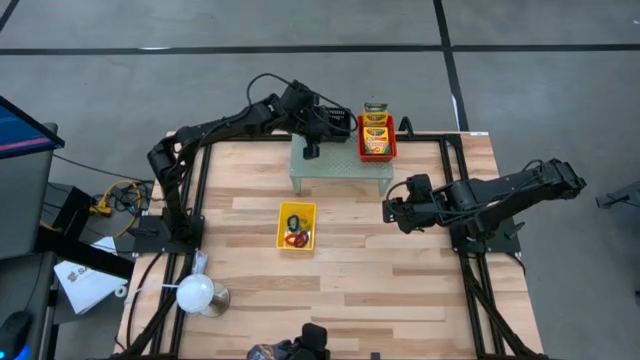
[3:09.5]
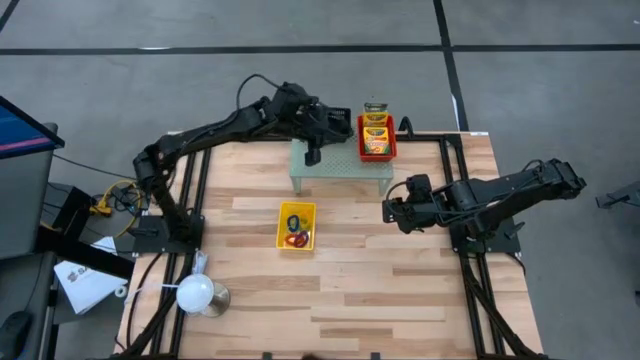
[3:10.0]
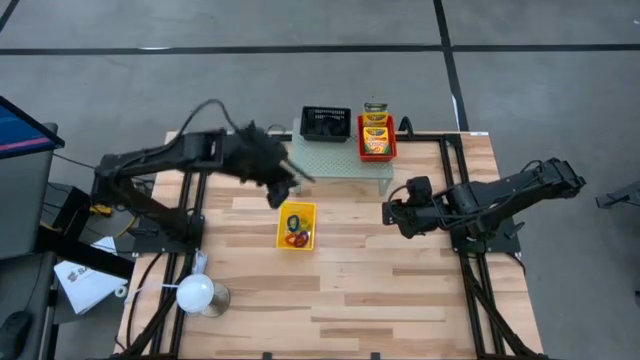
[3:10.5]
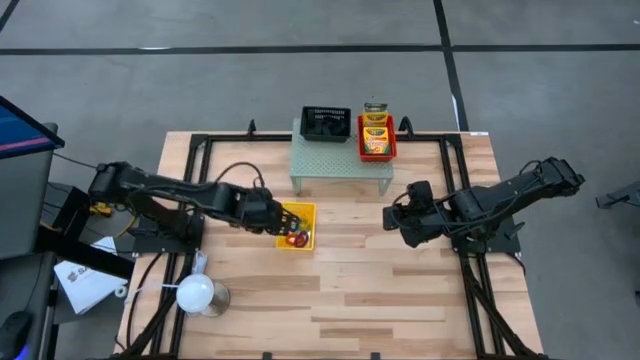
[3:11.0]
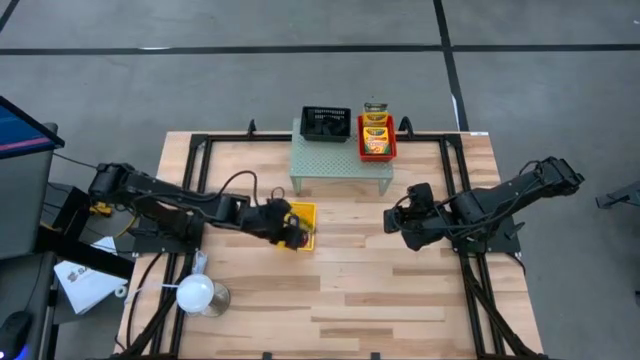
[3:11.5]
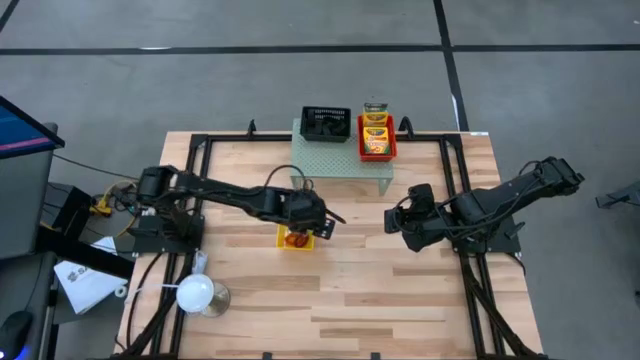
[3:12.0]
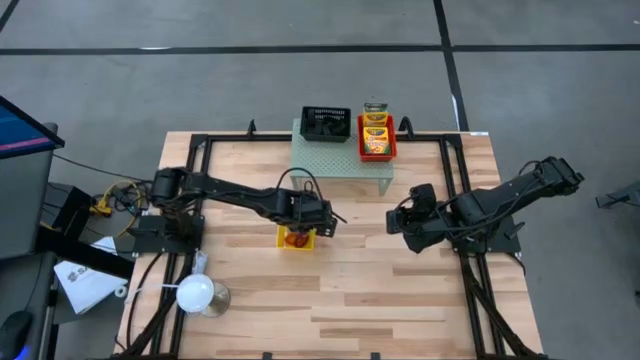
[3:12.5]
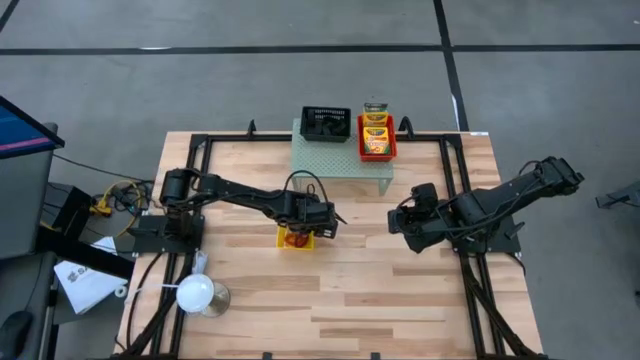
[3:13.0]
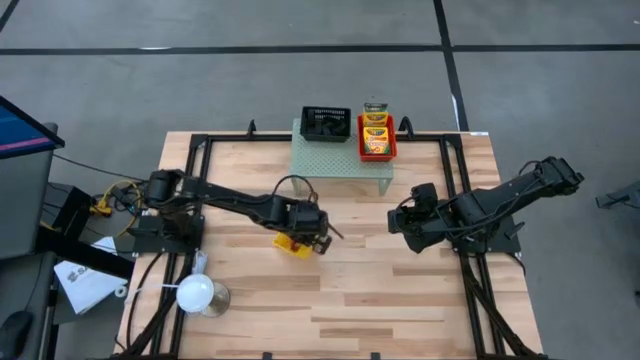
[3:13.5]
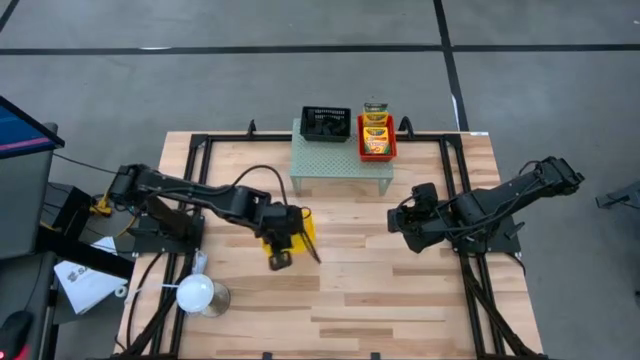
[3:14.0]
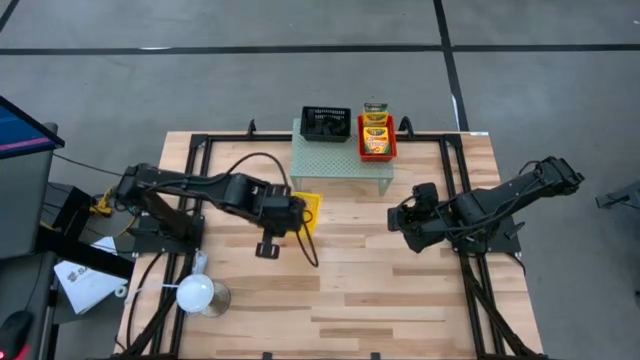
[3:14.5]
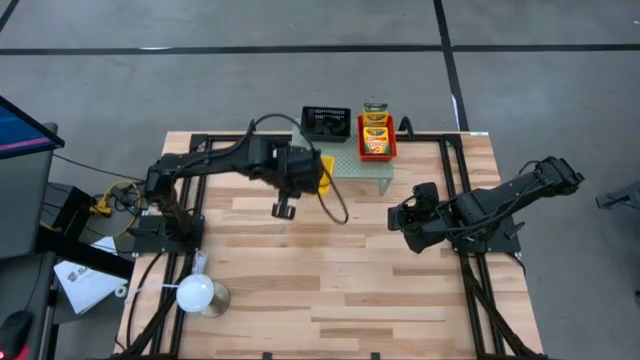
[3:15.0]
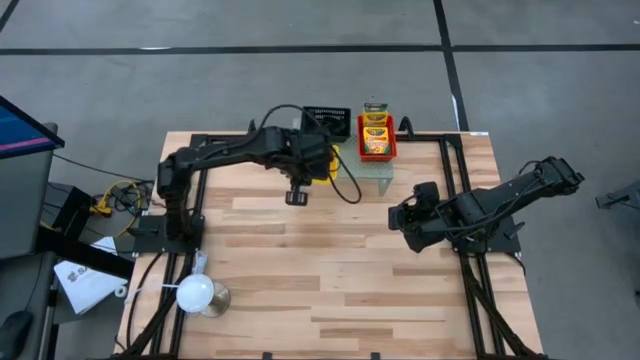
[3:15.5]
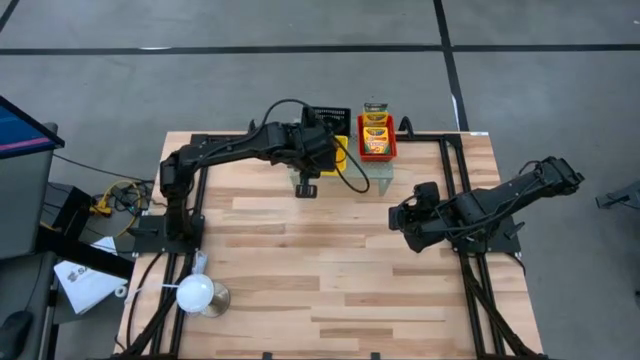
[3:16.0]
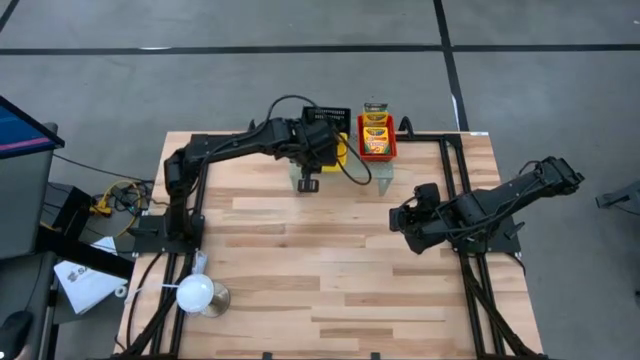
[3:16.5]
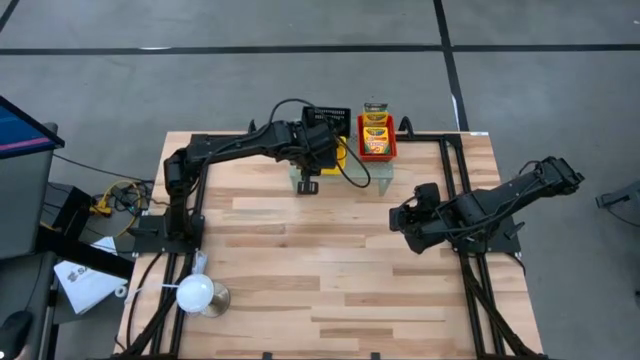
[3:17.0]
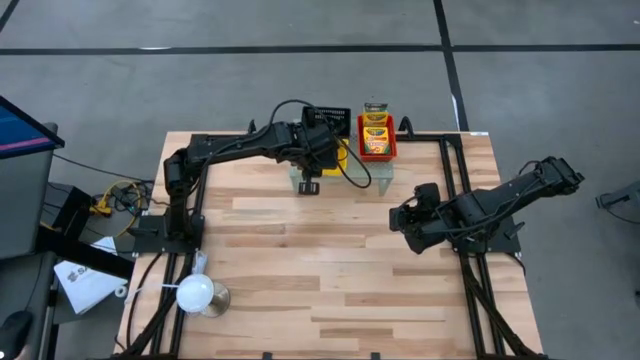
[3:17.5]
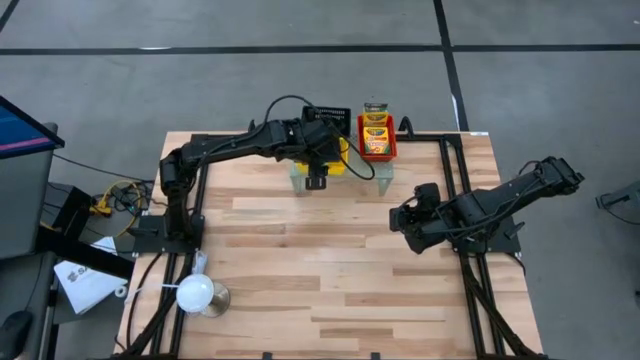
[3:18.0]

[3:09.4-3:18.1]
Task: Pick & Place Office Desk Supplies
Put the yellow bin on the shelf

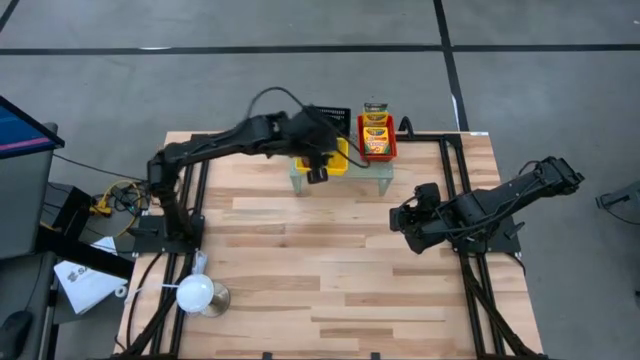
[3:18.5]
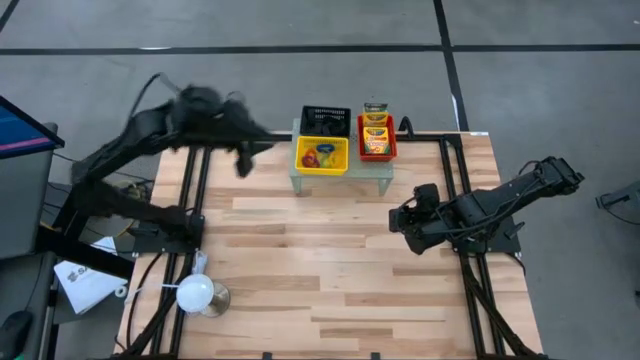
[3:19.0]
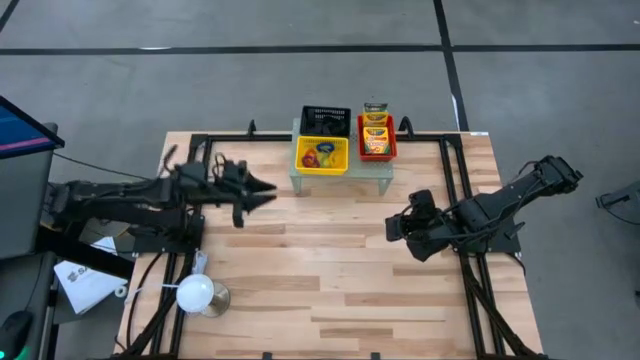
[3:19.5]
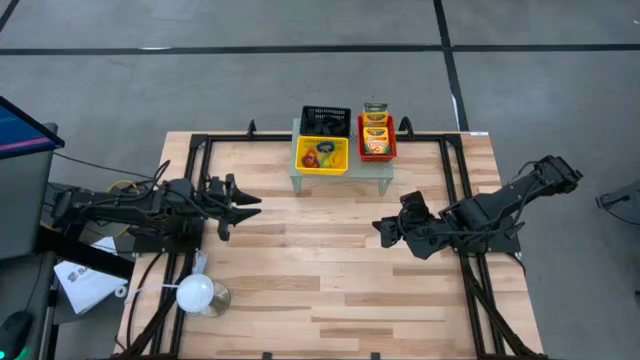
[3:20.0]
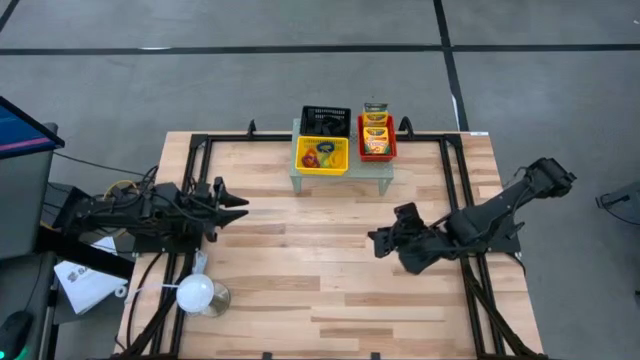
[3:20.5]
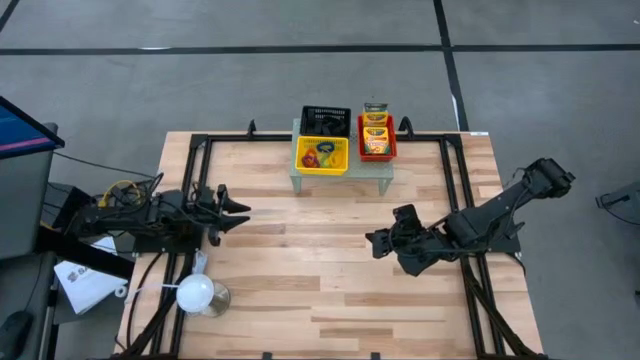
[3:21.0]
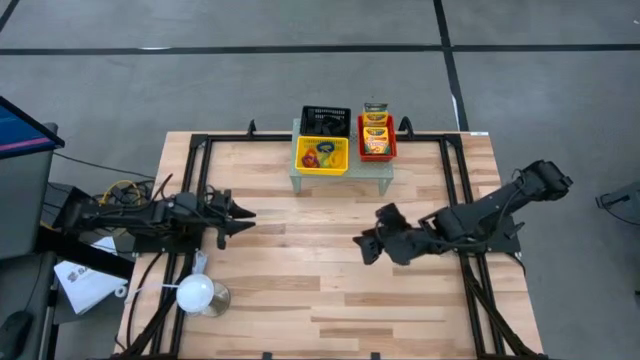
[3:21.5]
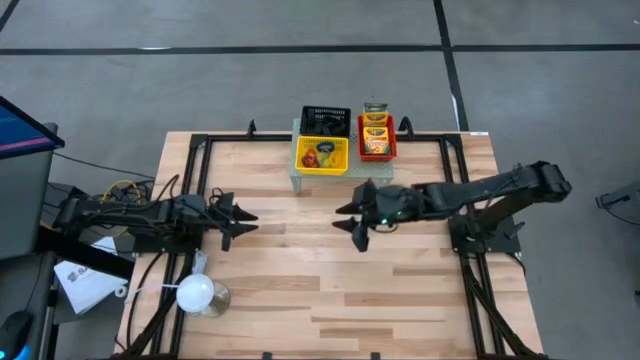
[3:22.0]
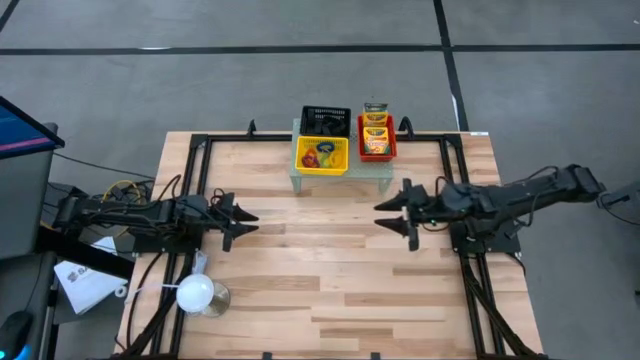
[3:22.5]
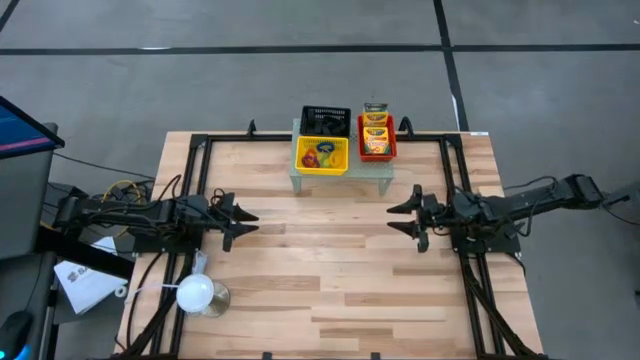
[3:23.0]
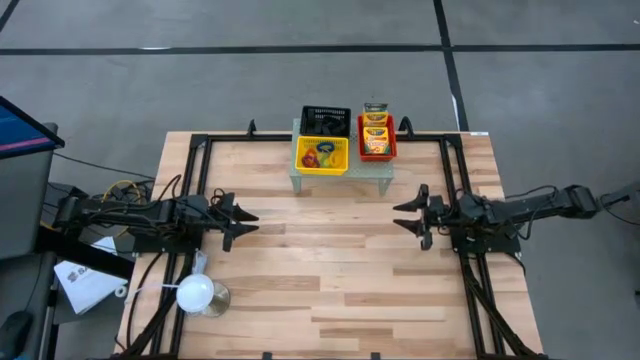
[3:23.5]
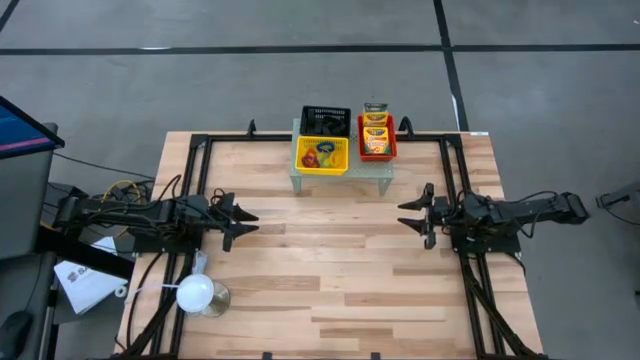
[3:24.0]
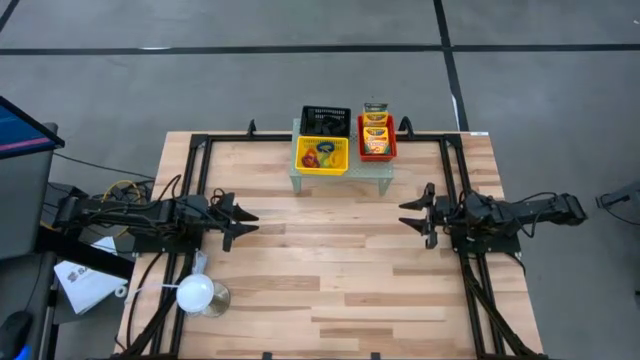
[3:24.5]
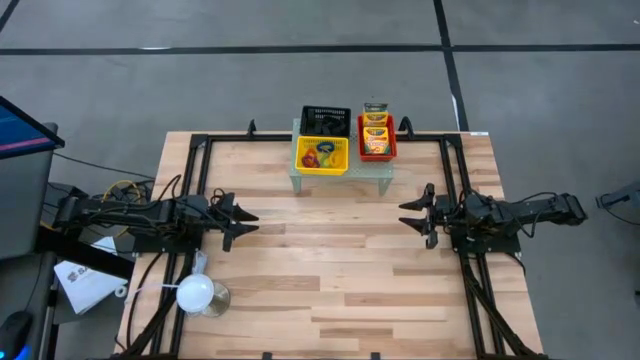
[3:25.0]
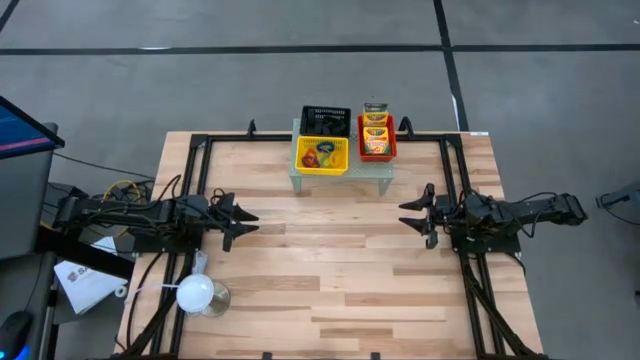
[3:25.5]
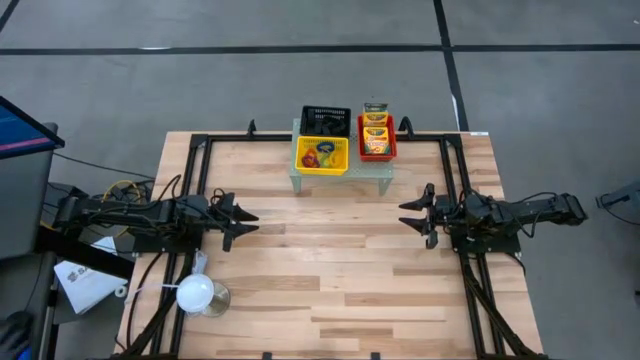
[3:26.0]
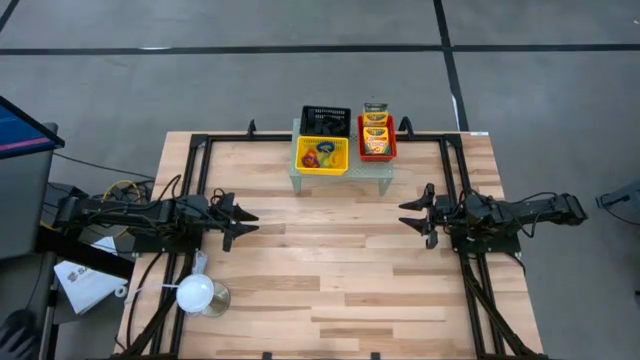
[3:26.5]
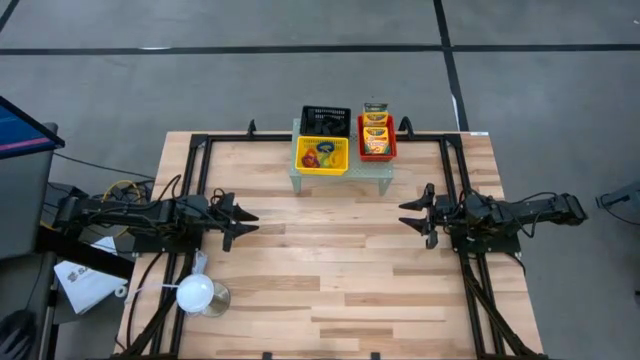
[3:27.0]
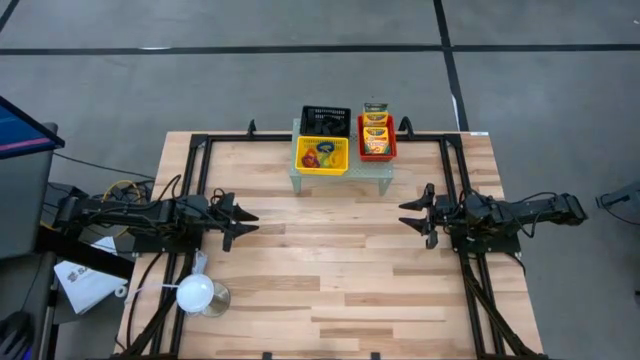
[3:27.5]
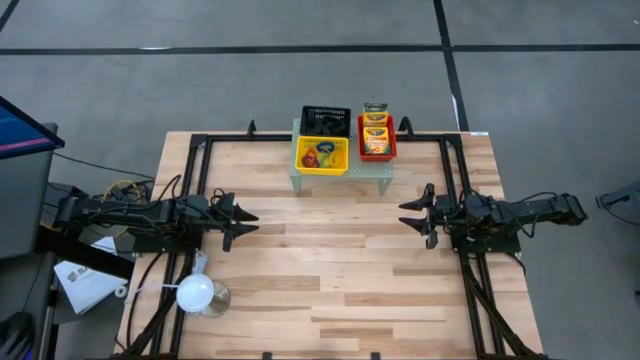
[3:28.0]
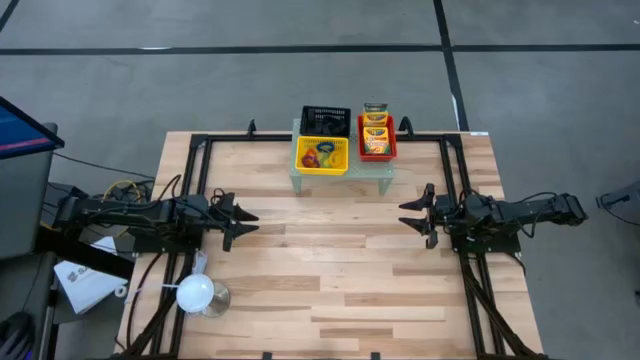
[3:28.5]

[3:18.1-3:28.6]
Return to Home Position

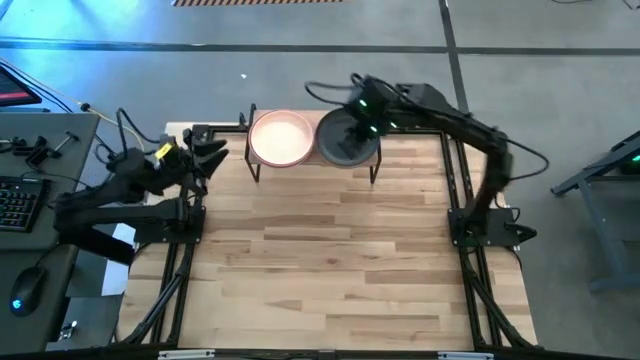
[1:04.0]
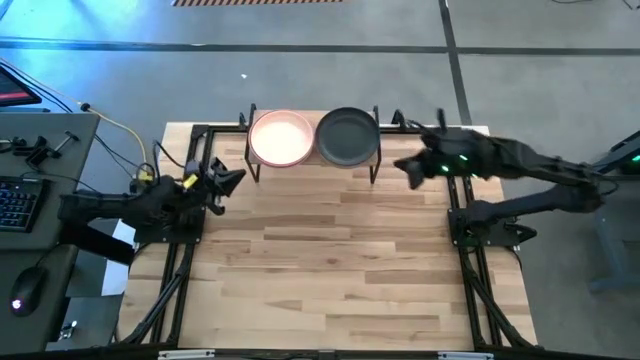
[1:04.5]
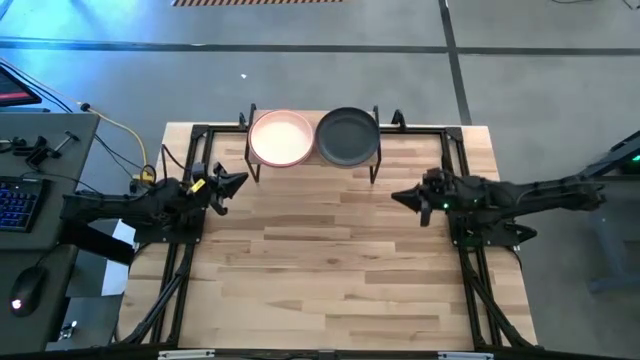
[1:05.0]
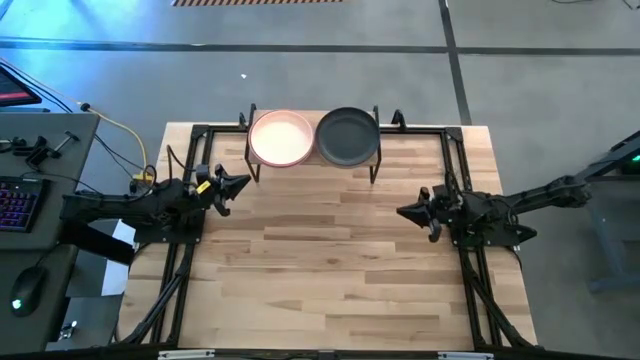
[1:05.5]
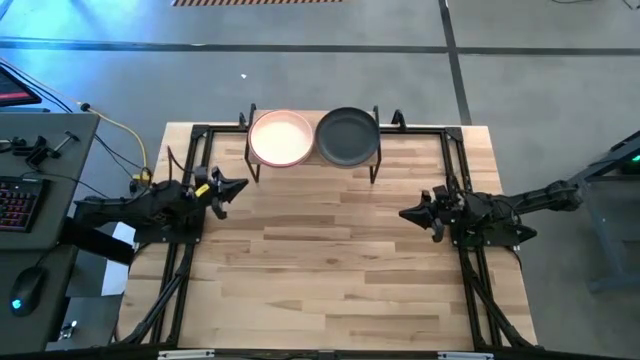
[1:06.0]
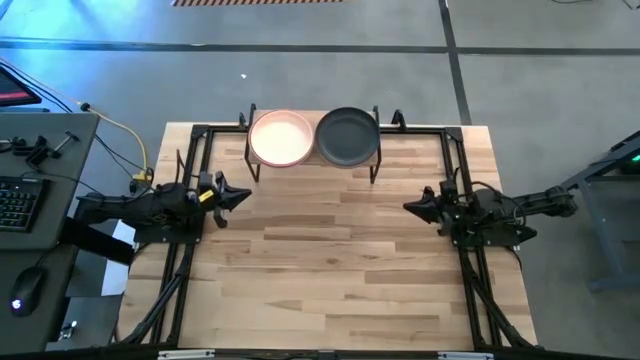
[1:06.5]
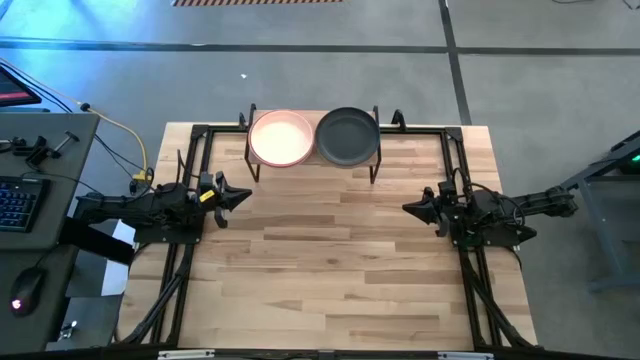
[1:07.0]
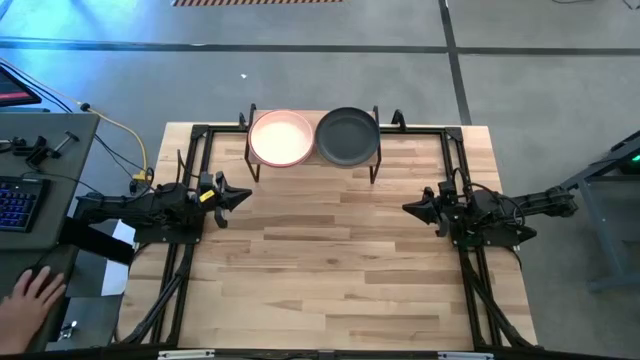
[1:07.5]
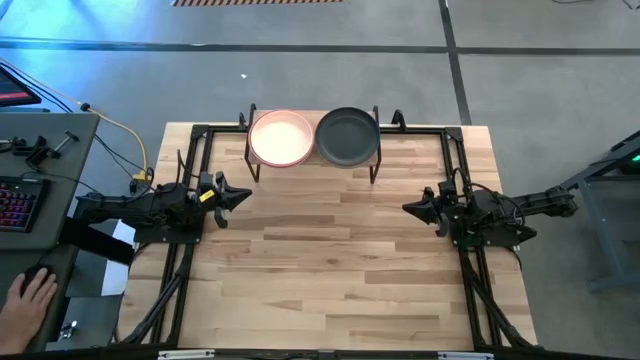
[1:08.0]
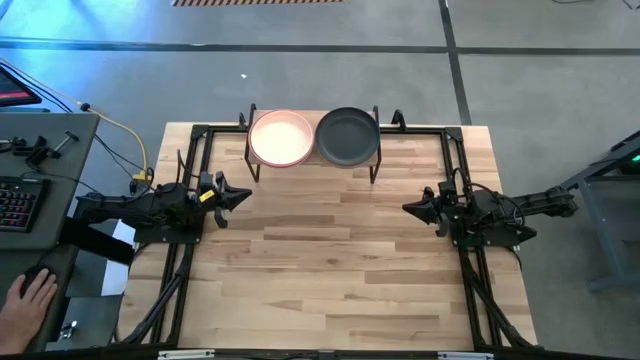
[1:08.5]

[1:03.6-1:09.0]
Task: Place and stack plates onto a shelf
Return to Home Position
